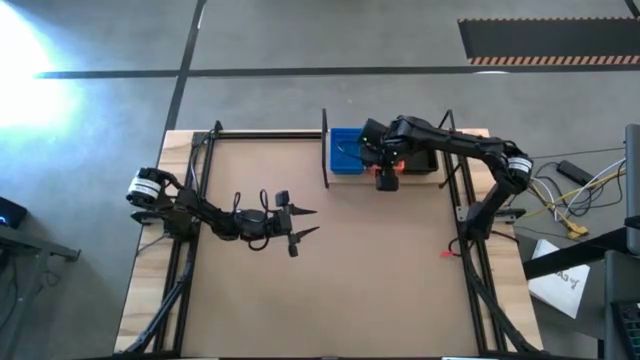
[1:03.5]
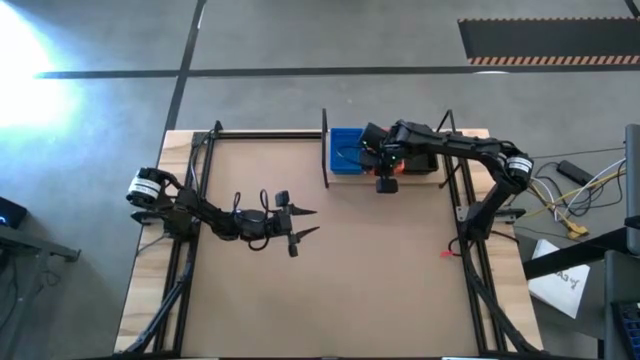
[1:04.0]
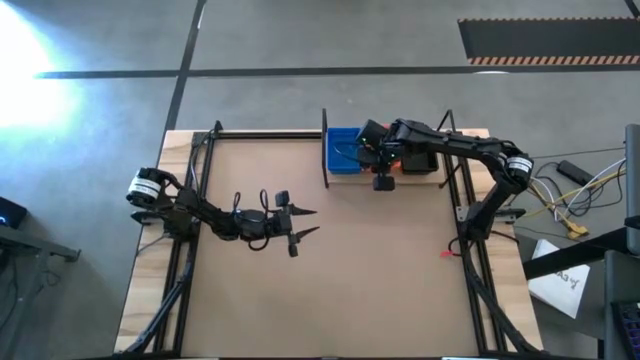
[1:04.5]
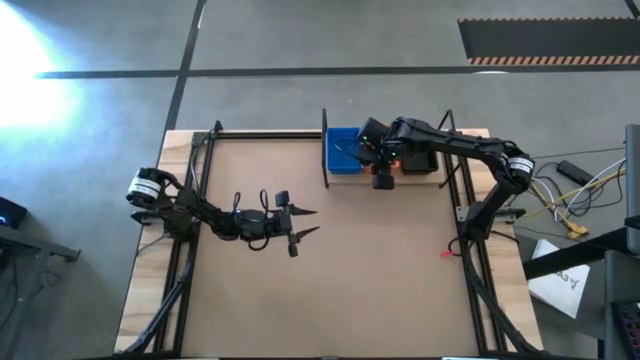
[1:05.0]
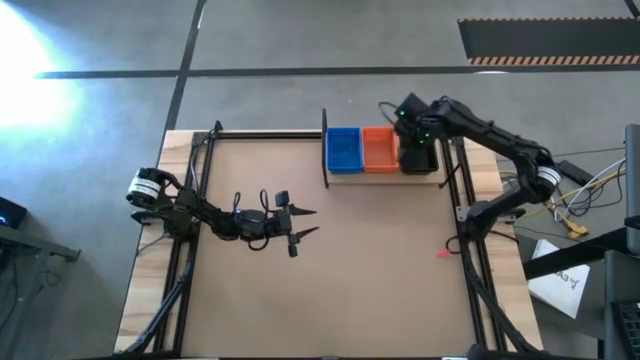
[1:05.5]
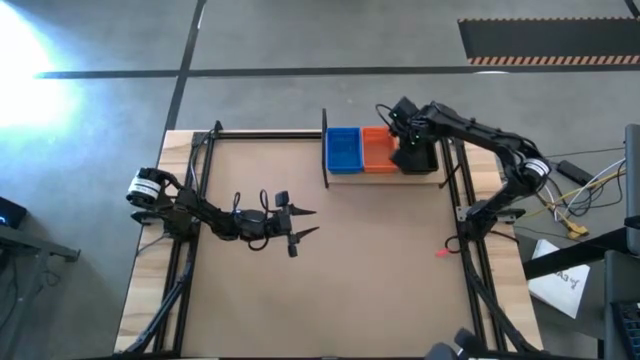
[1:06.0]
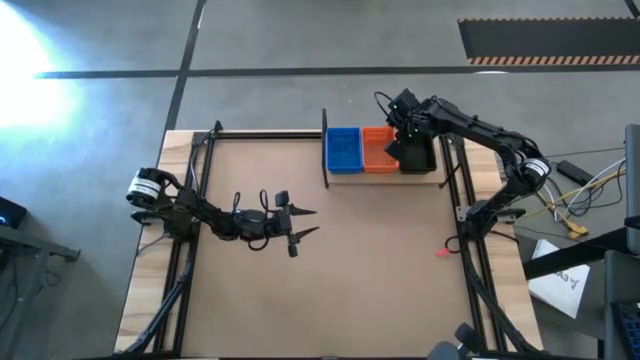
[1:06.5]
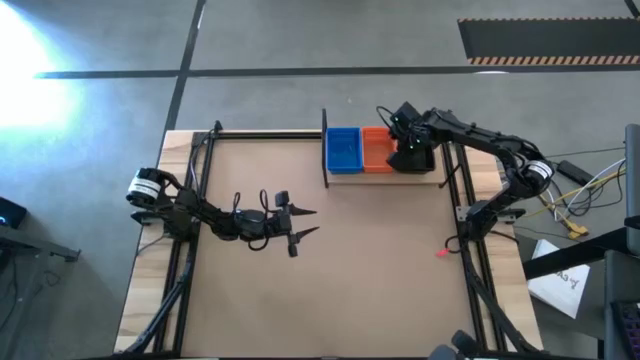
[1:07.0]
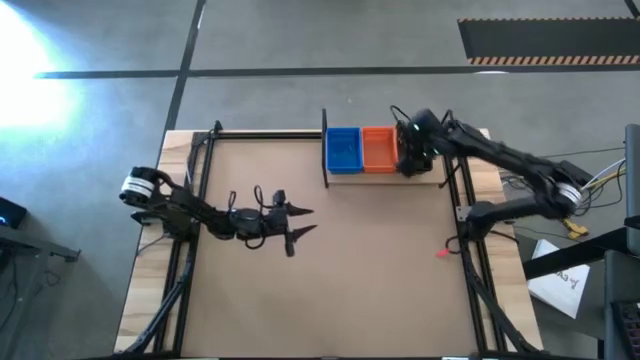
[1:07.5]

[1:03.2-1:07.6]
Task: Stack baskets on shelf by color
Adjust the baskets on the shelf

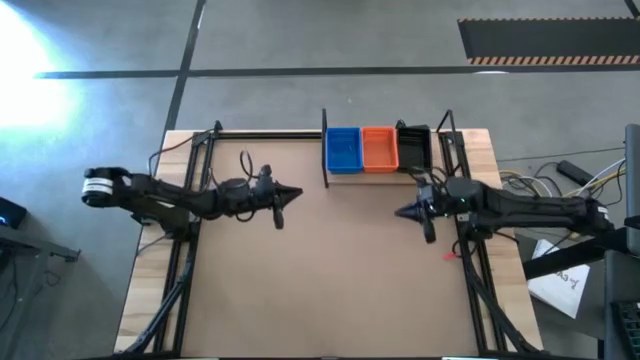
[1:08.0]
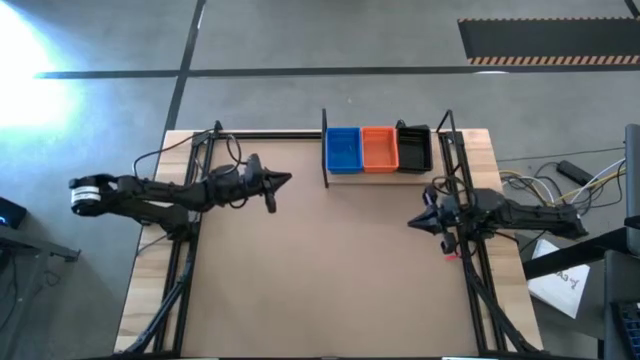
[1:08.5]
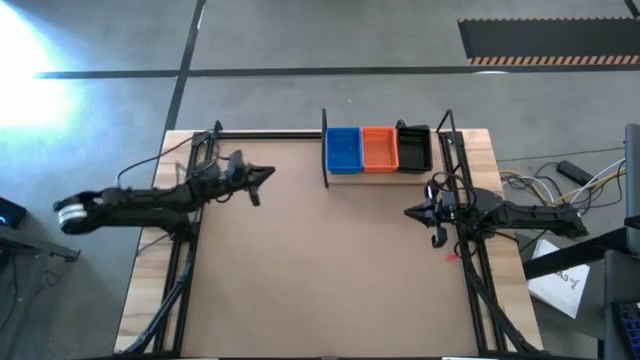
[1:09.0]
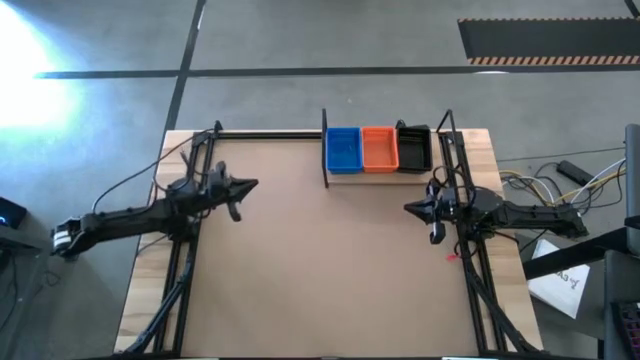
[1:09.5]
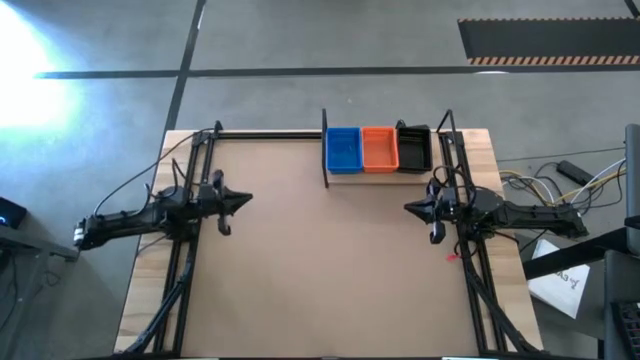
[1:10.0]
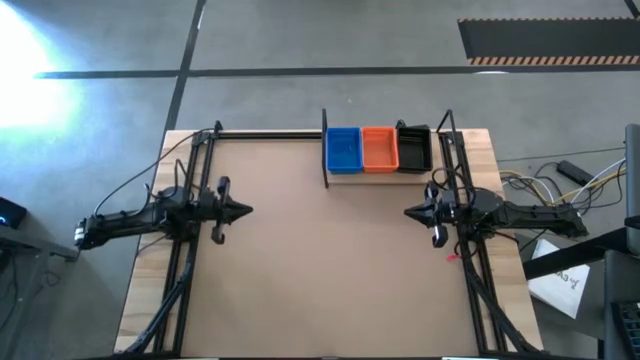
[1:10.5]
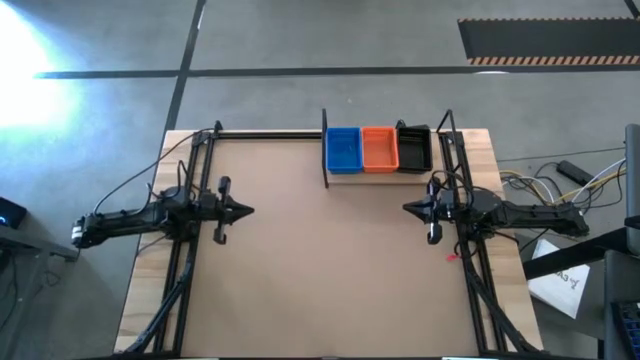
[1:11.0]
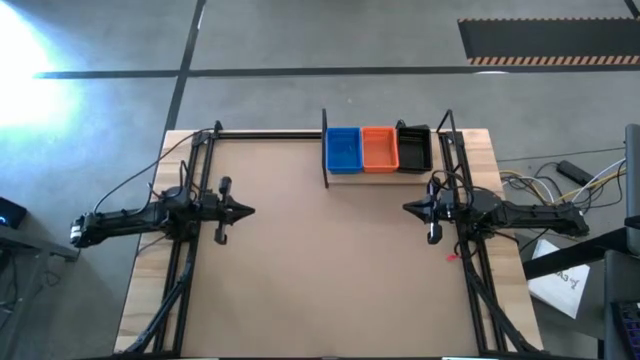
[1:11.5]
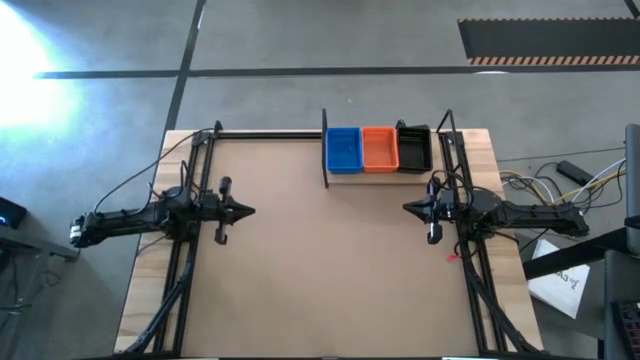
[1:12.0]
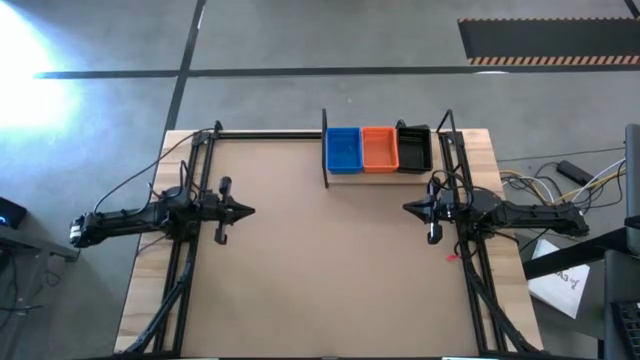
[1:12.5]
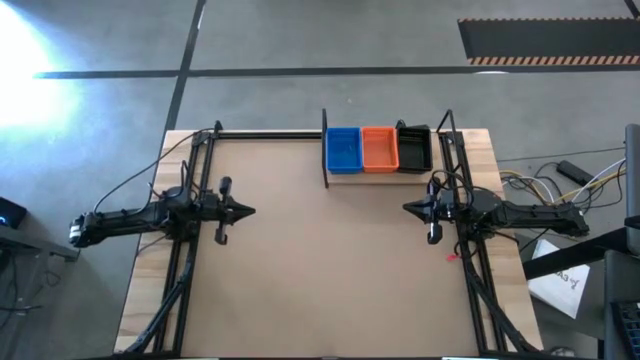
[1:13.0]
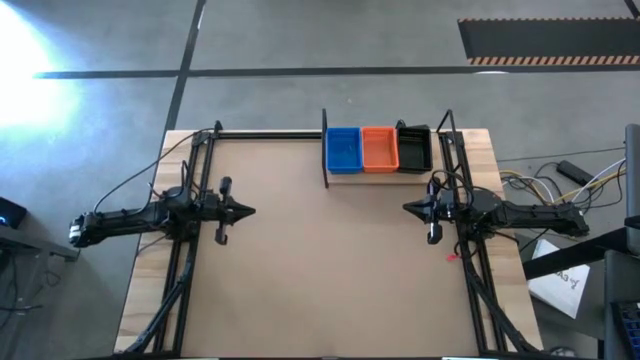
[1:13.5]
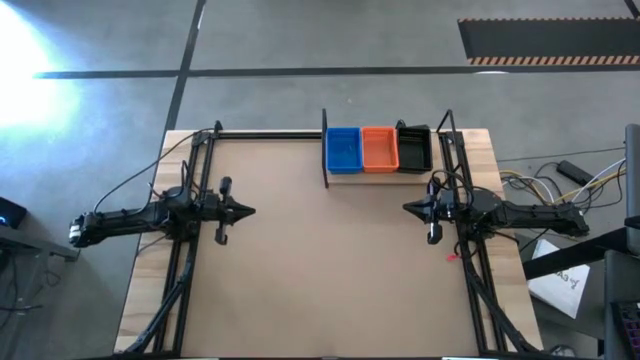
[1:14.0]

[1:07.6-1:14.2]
Return to Home Position

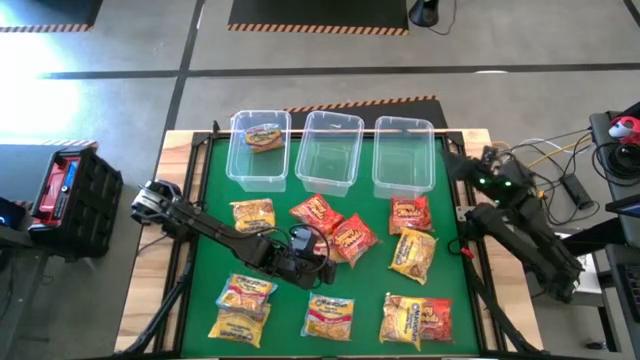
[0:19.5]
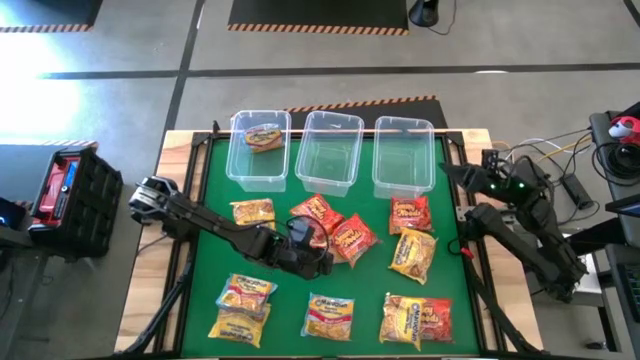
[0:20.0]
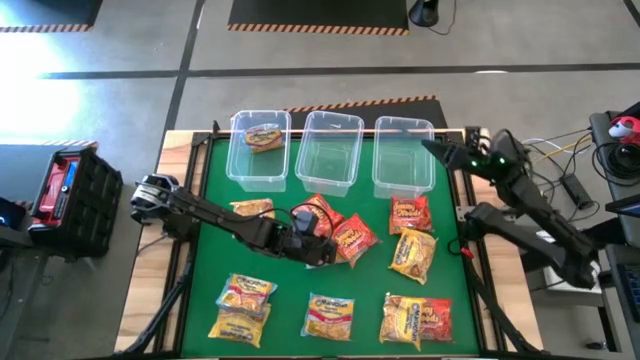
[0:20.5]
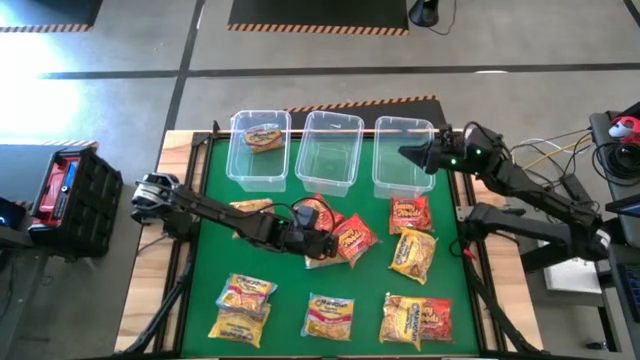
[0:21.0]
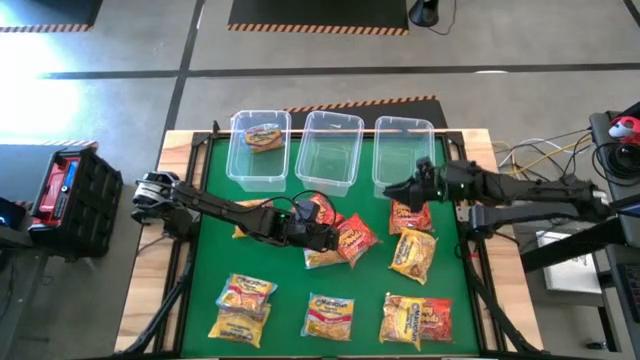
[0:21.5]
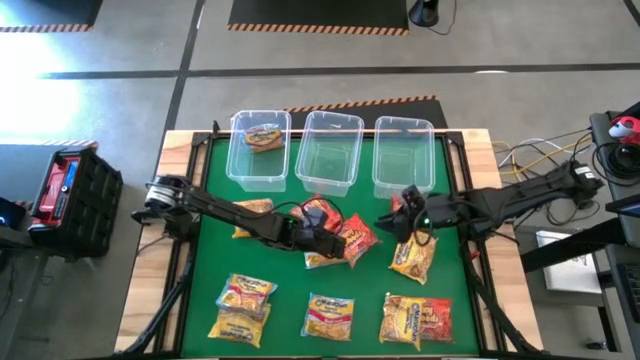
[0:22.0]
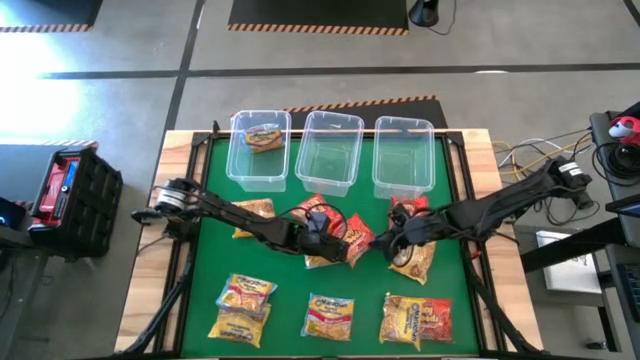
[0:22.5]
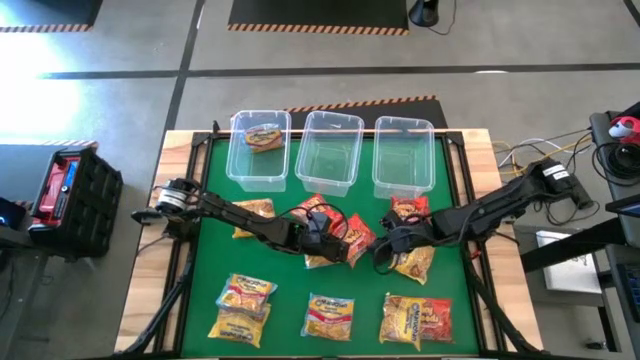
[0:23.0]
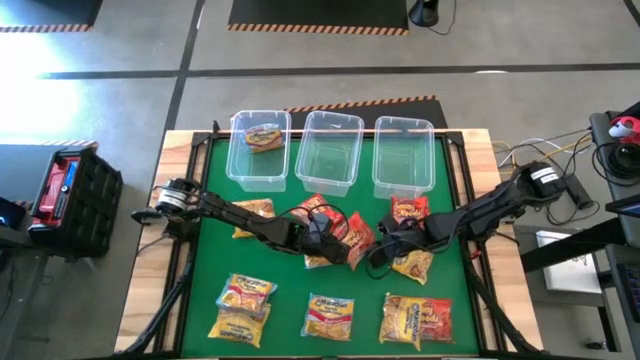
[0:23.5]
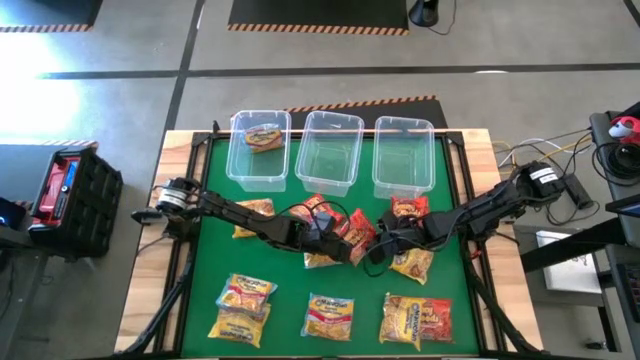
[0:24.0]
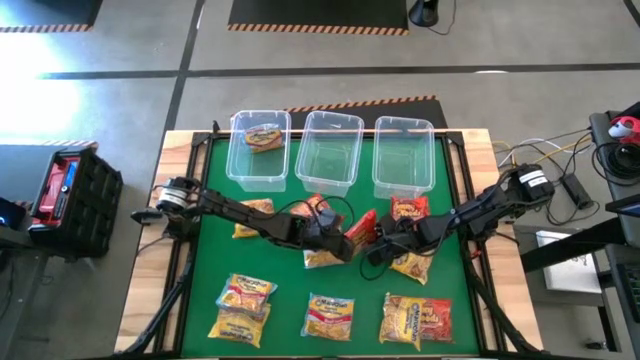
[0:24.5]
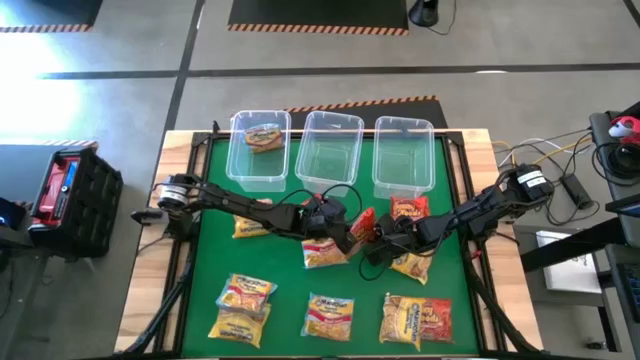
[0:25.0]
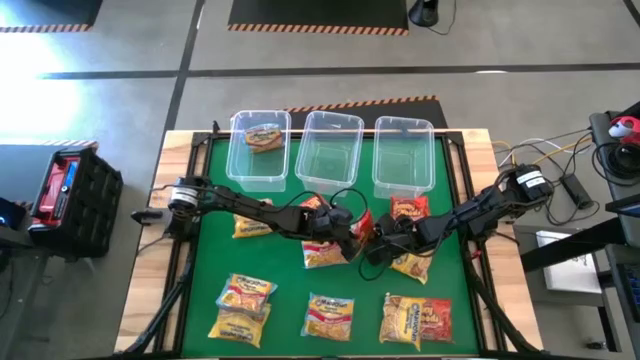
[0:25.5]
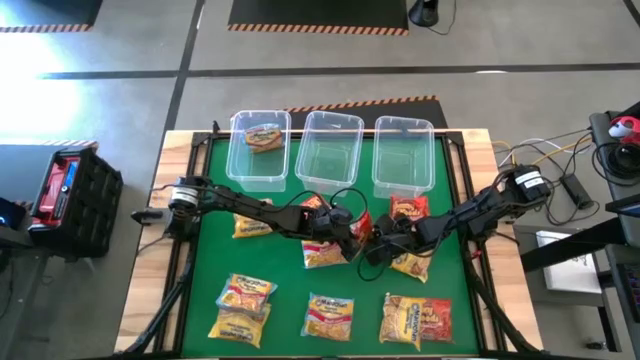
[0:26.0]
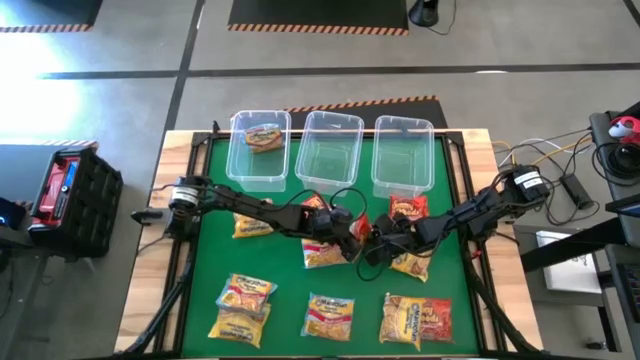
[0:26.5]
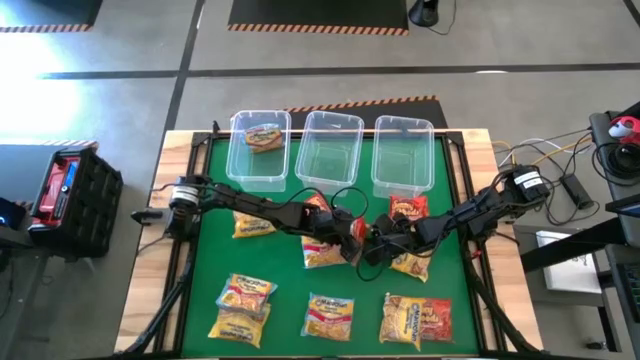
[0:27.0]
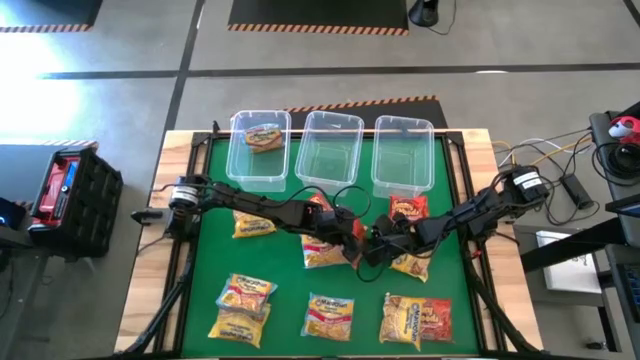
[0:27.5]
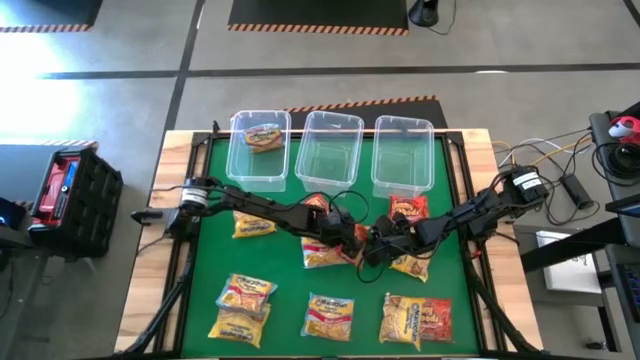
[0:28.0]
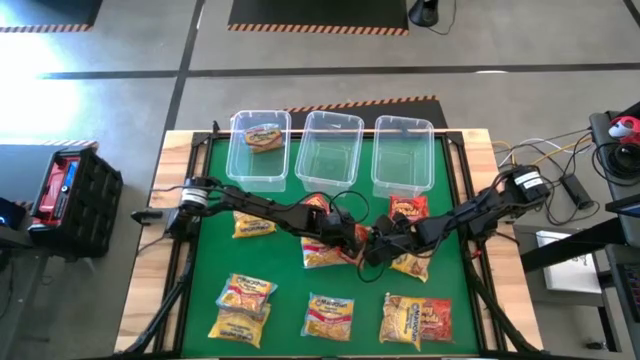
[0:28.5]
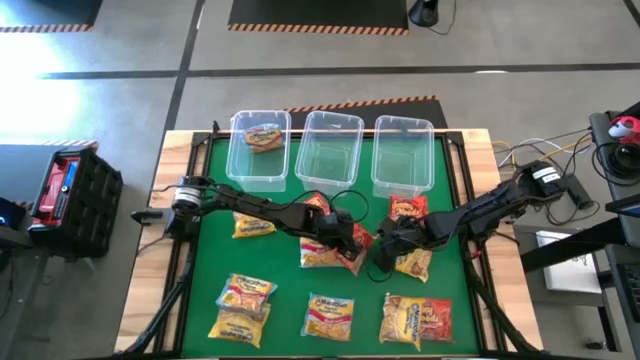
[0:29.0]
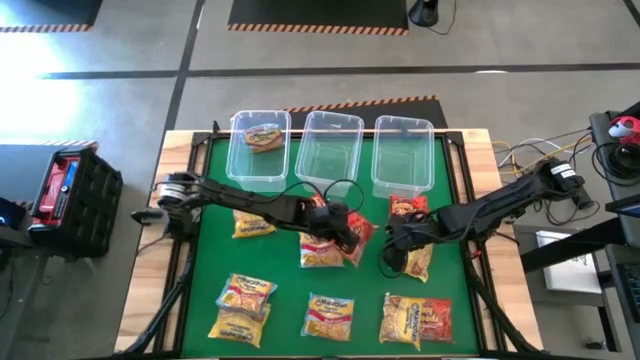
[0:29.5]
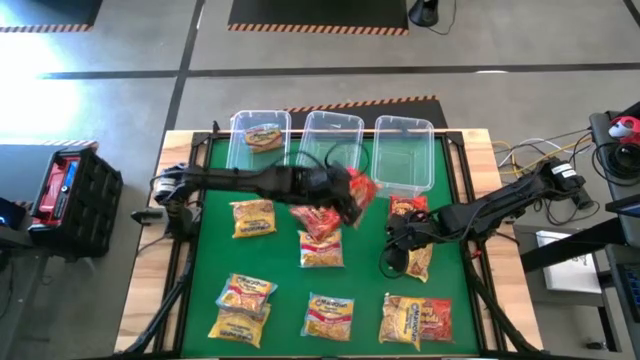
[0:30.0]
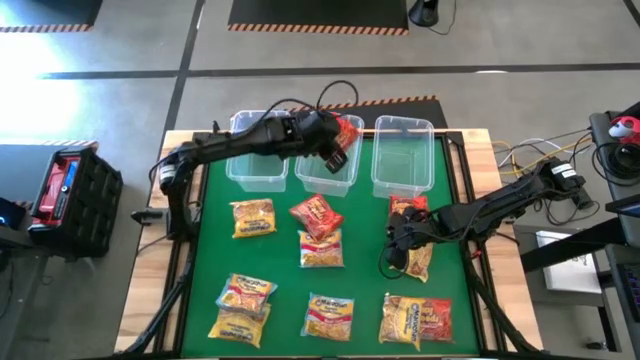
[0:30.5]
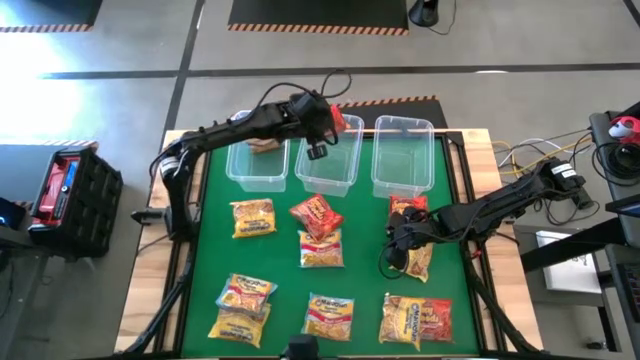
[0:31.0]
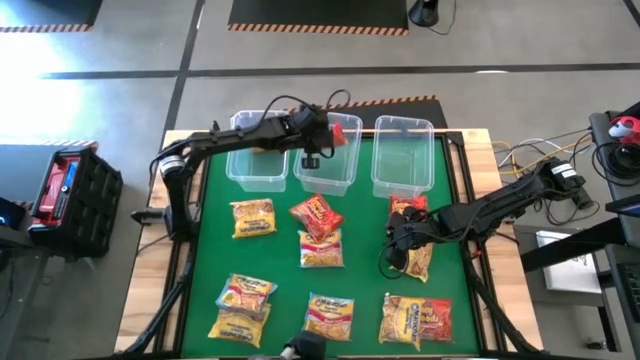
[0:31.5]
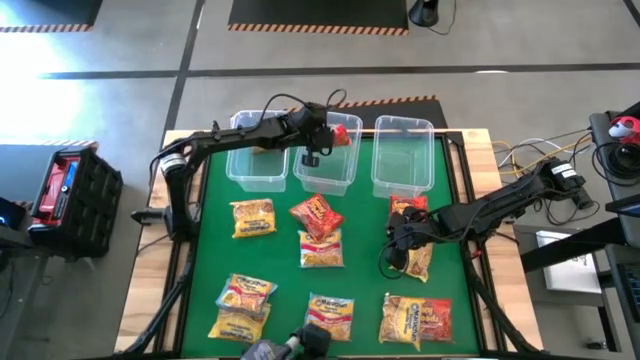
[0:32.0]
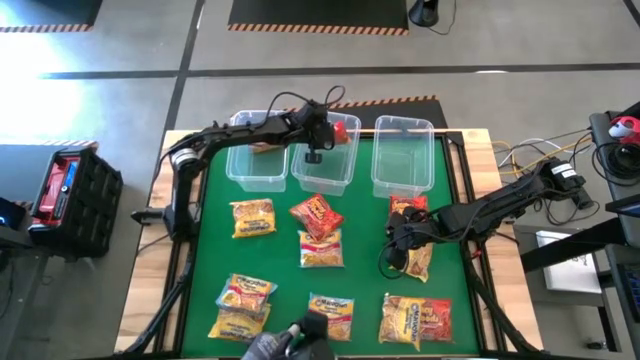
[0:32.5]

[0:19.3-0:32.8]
Task: Sort Maruchan noodles
Put the top center orange noodle pack into the top center transparent bin
